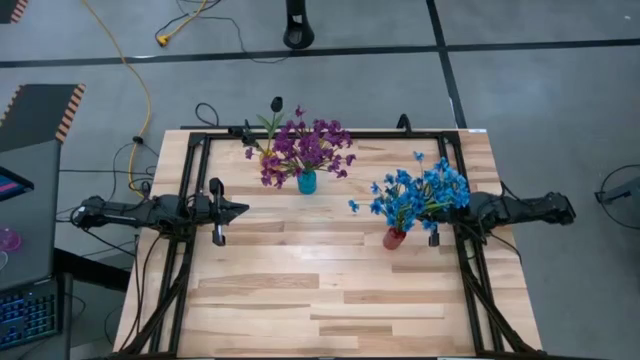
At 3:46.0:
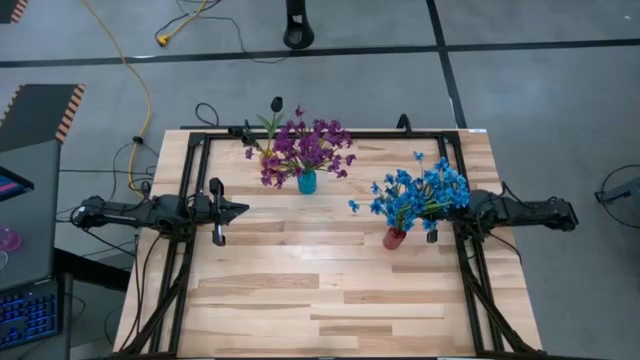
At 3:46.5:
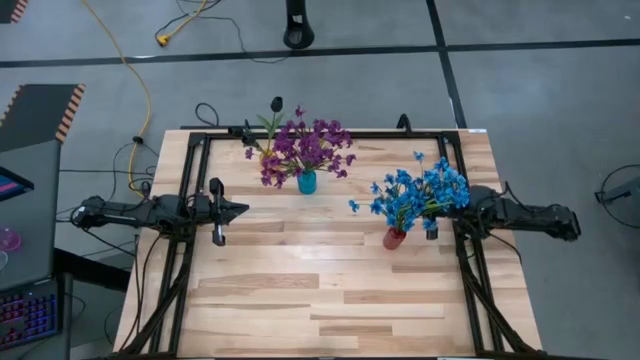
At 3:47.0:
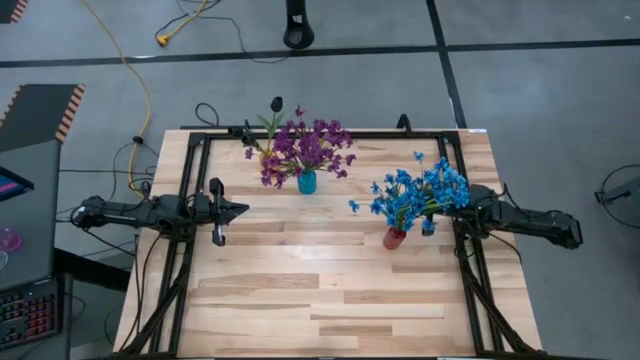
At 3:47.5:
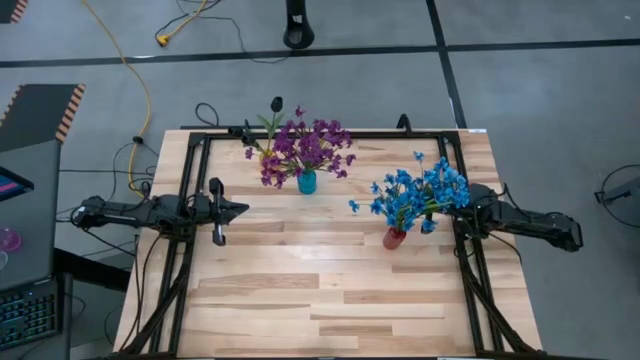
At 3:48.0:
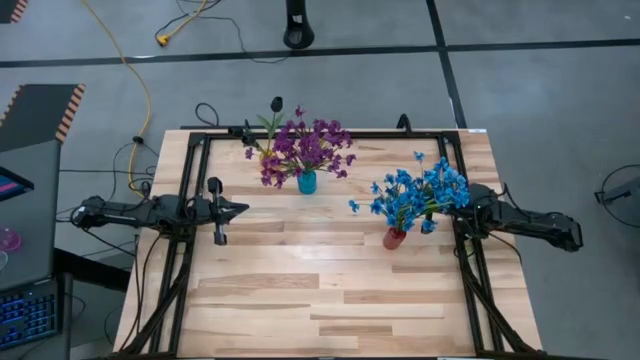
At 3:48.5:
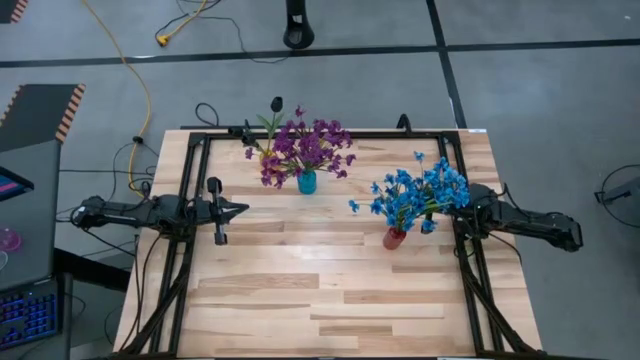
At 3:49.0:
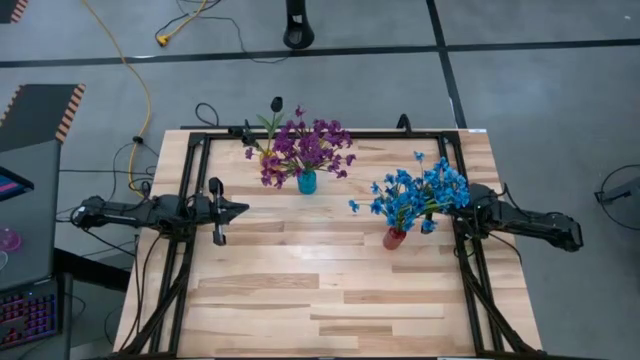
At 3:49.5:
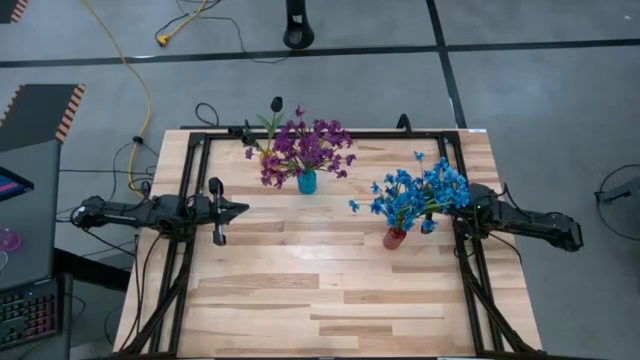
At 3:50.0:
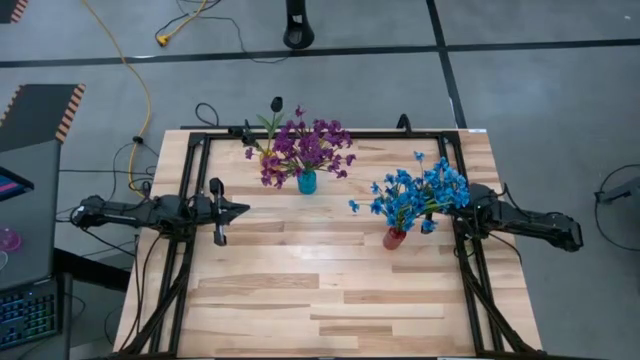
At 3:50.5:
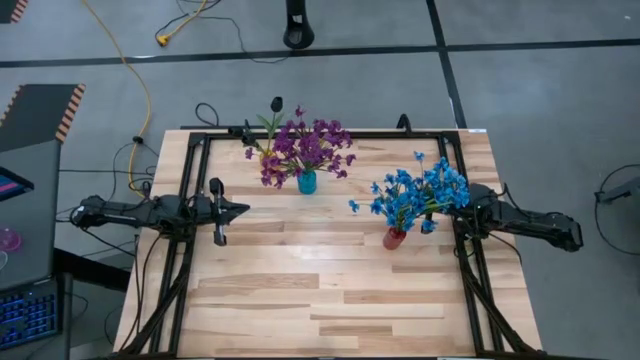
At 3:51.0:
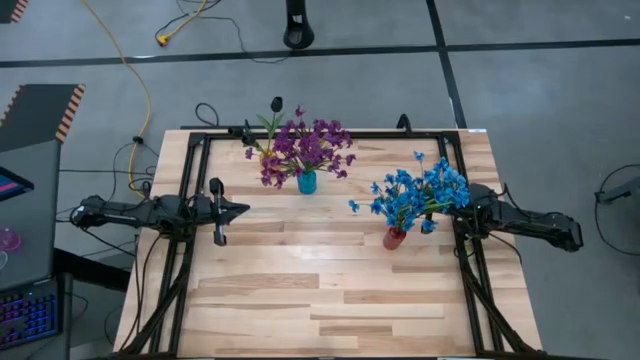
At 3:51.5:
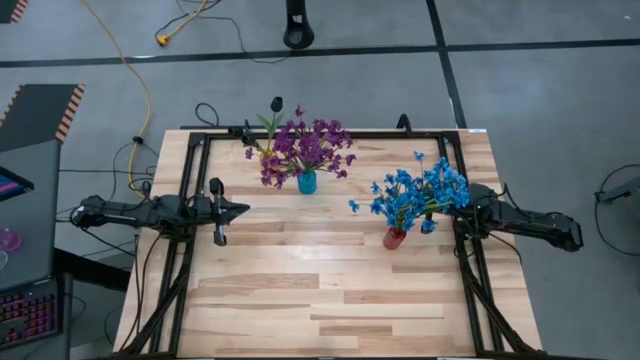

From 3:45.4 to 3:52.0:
Task: Sort flowers into vase by color
Return to Home Position

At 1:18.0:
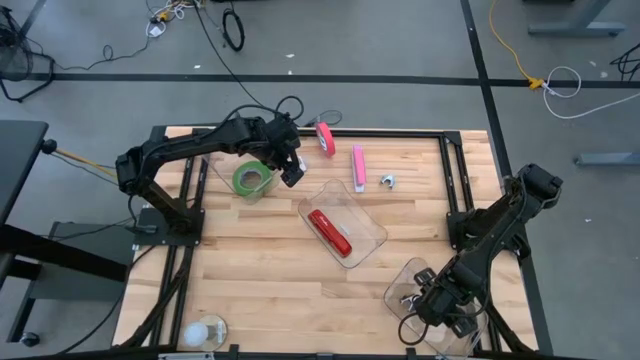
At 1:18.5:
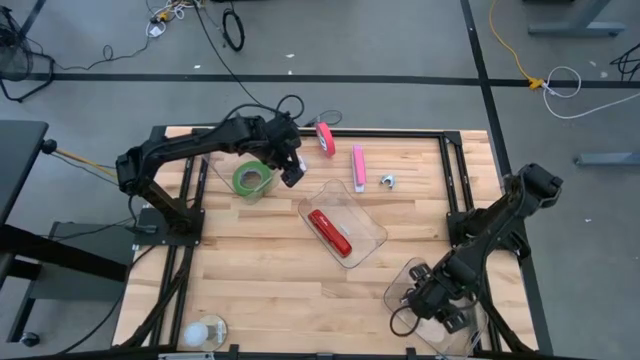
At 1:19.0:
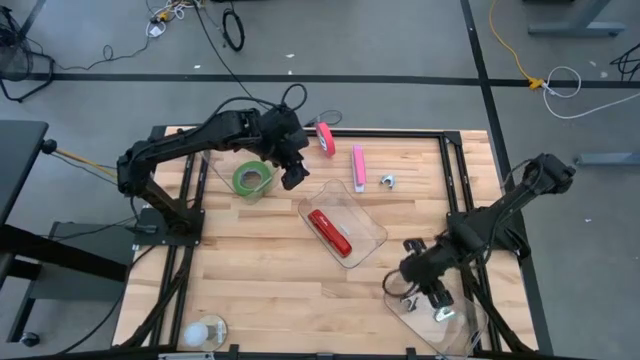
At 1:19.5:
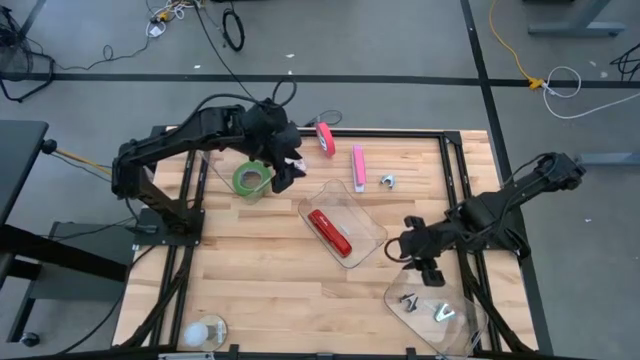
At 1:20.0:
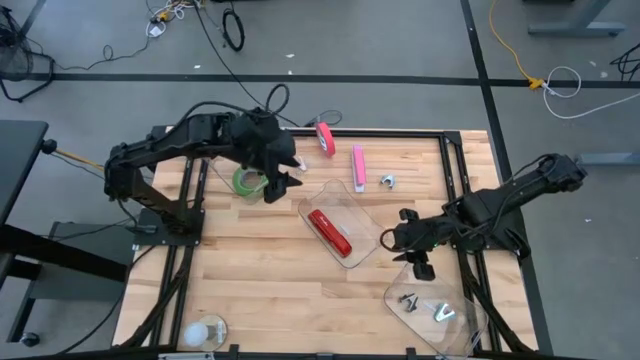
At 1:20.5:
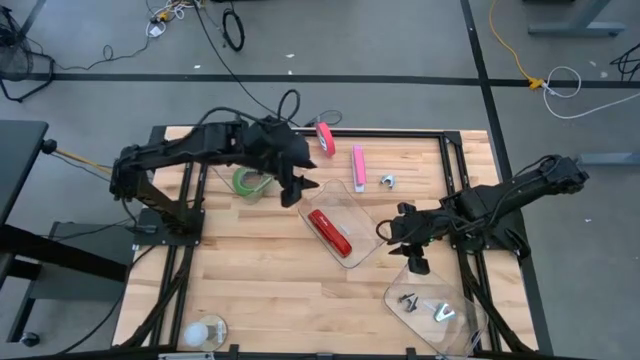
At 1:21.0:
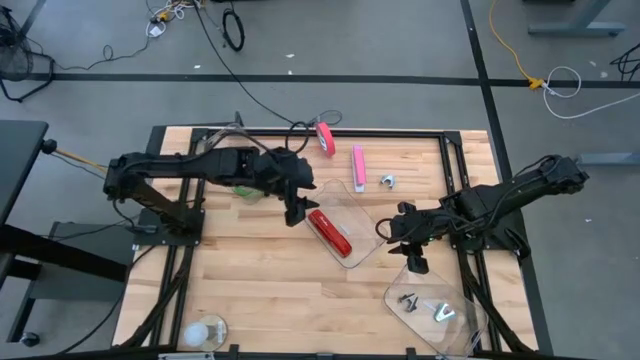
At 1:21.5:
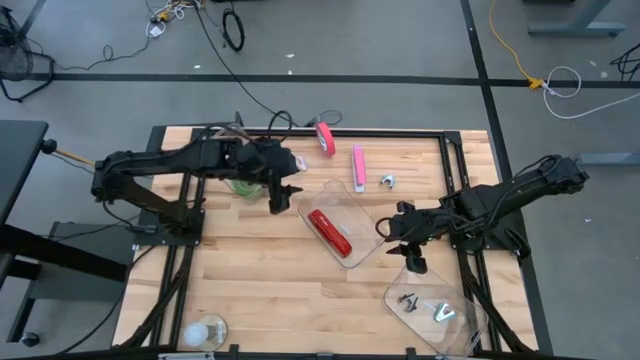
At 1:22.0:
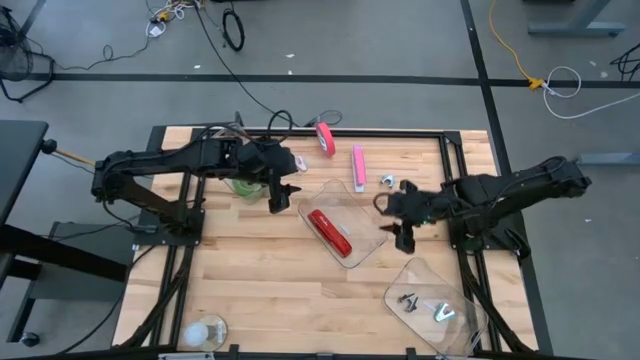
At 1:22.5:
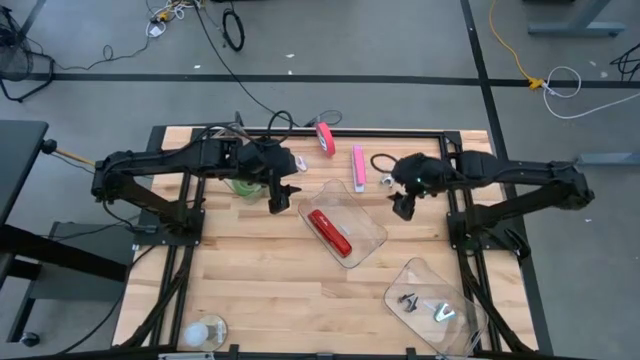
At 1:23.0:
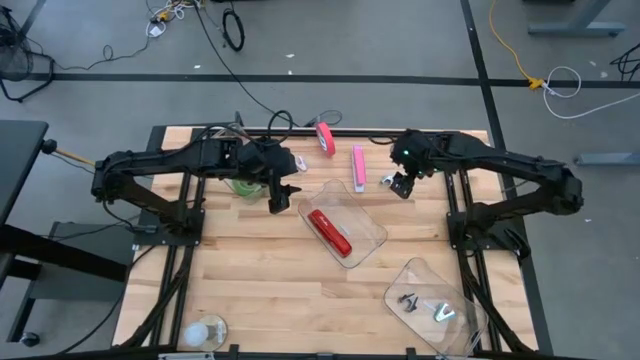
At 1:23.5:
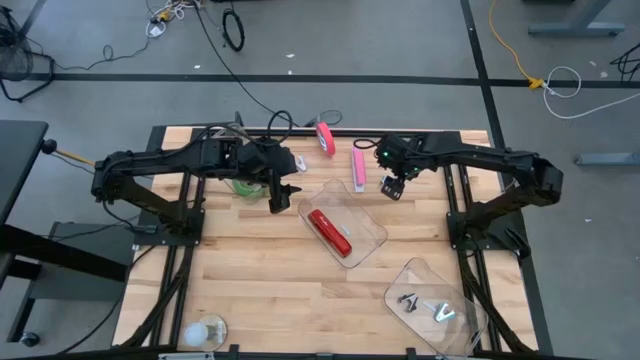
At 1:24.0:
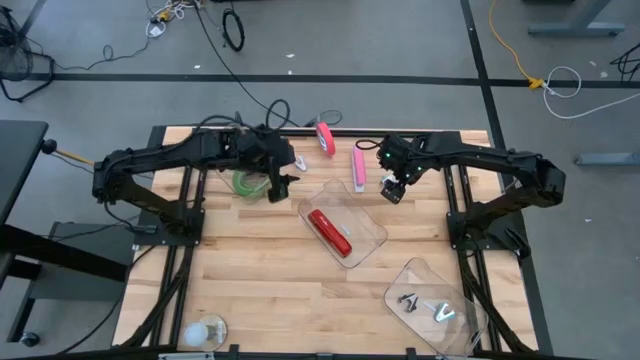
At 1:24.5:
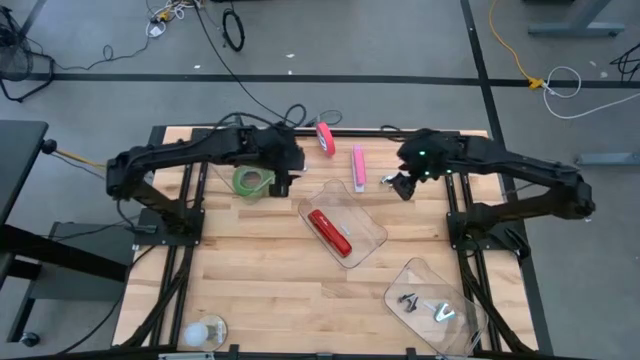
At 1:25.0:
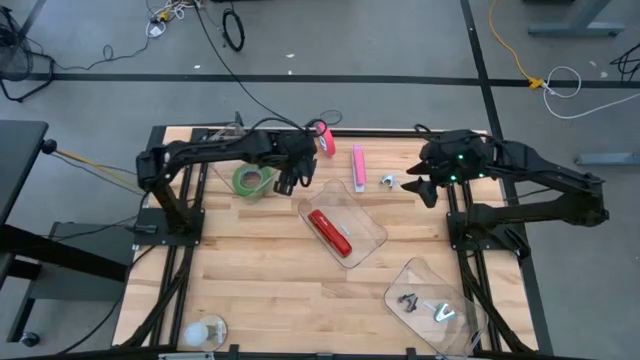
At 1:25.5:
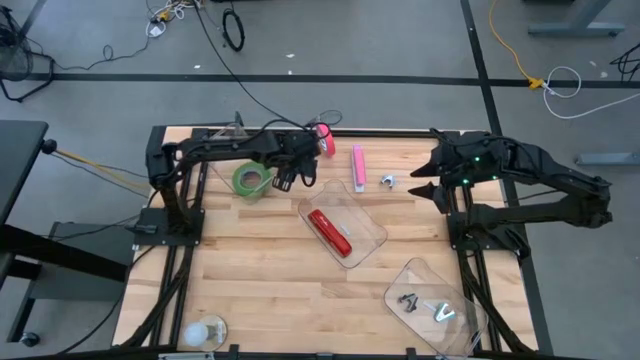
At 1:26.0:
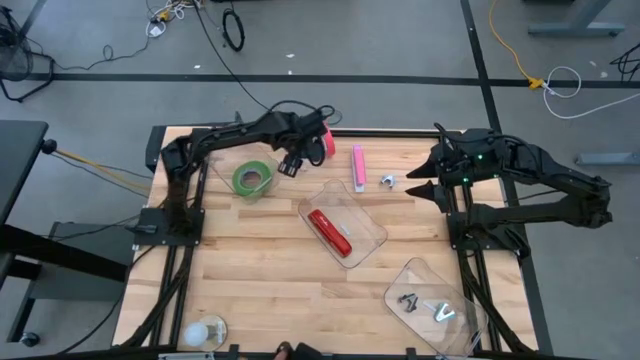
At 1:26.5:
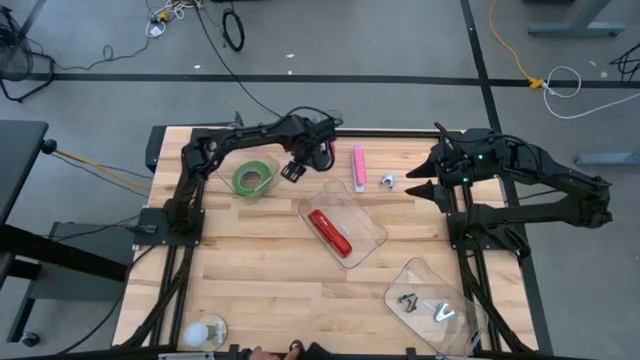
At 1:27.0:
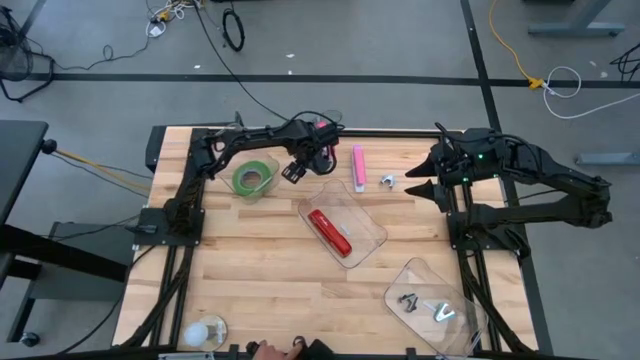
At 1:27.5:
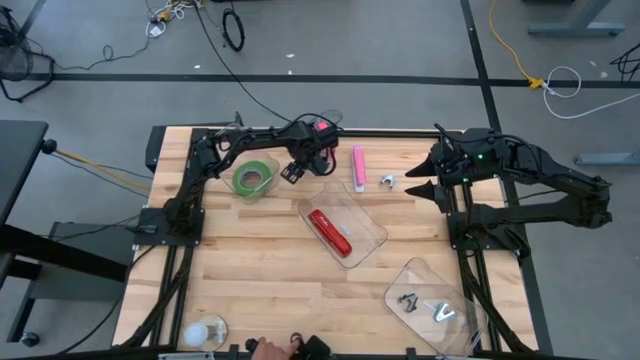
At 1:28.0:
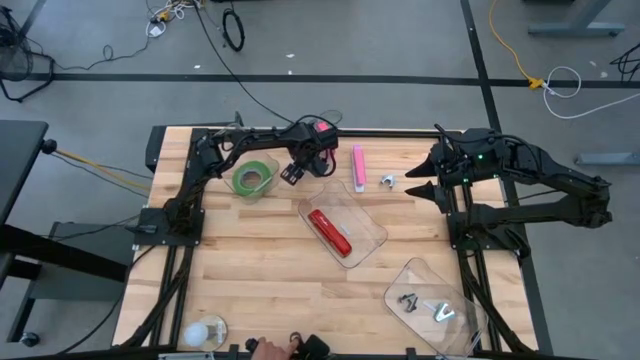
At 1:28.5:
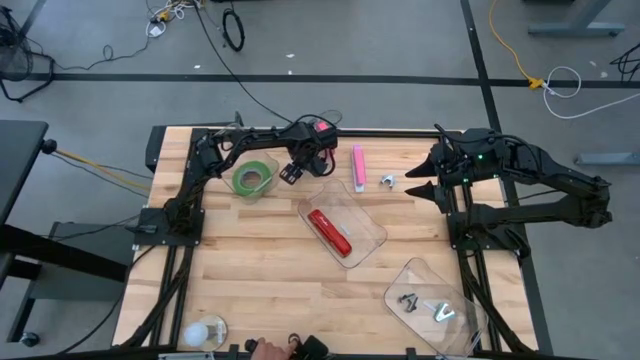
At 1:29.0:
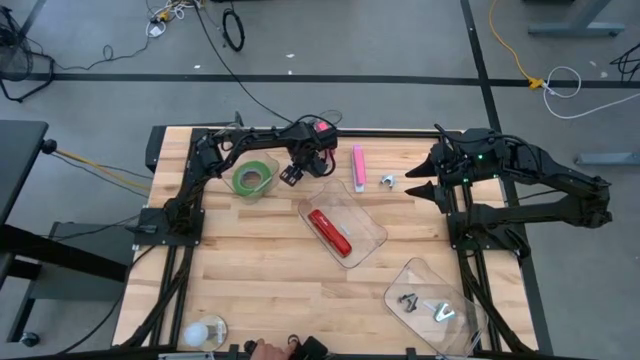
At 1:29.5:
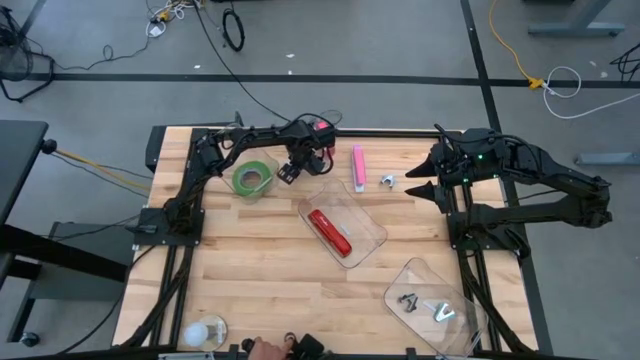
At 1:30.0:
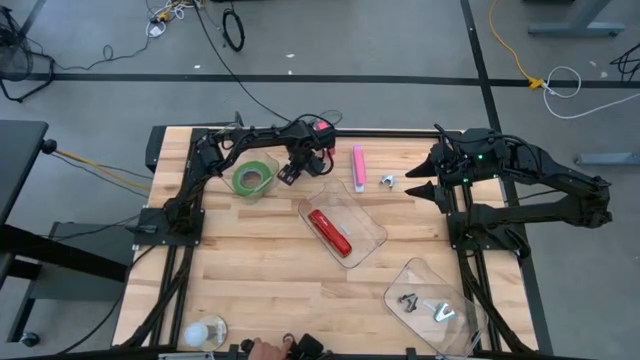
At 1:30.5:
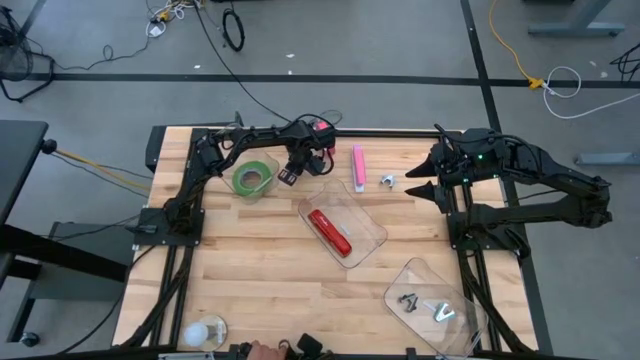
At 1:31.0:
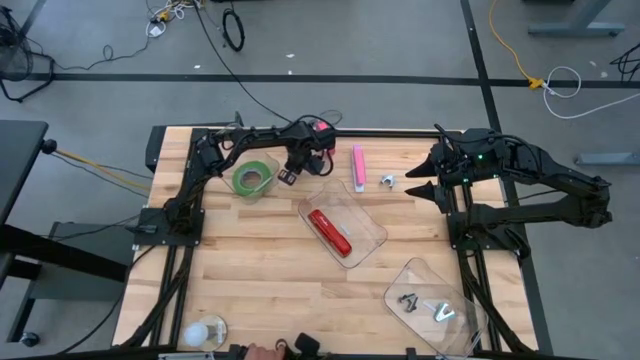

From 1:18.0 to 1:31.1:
Task: Pick and place Stapler, Stapler remover, tape
Put the purple staple remover into the bottom transparent bin
